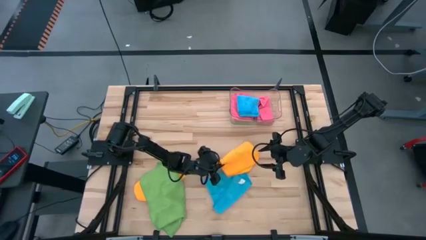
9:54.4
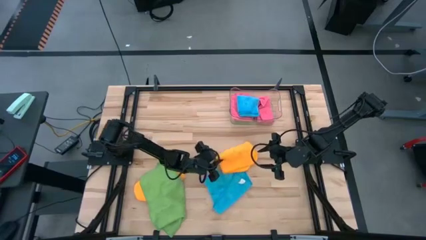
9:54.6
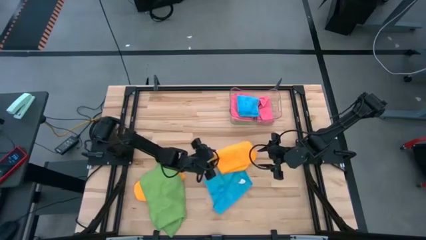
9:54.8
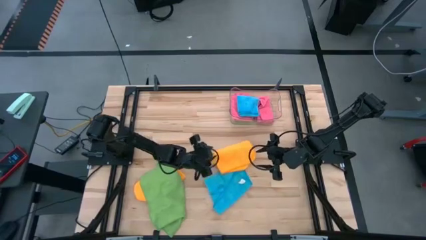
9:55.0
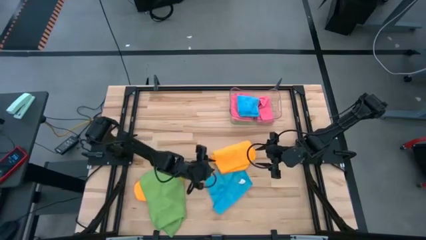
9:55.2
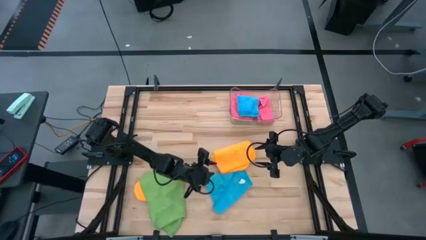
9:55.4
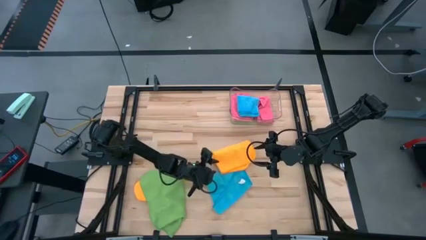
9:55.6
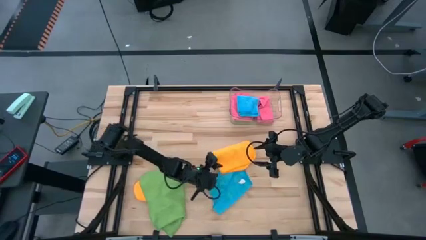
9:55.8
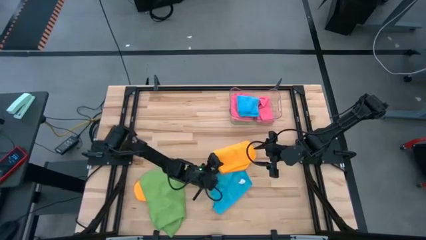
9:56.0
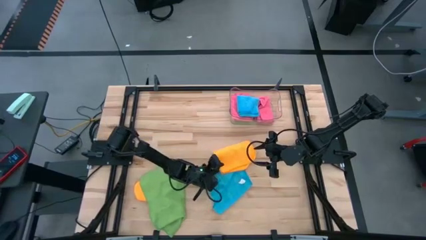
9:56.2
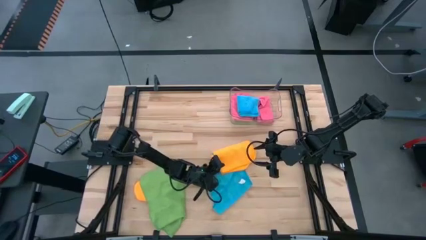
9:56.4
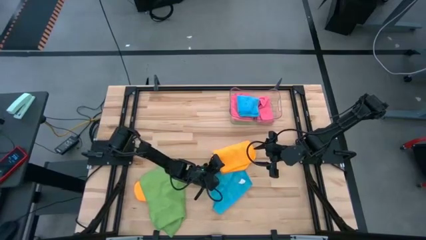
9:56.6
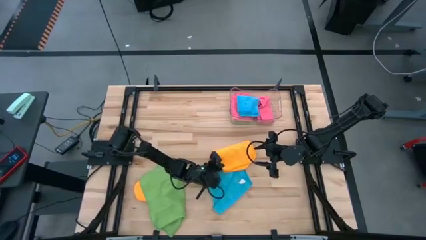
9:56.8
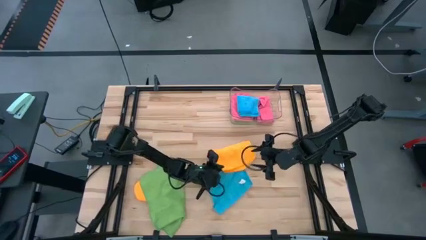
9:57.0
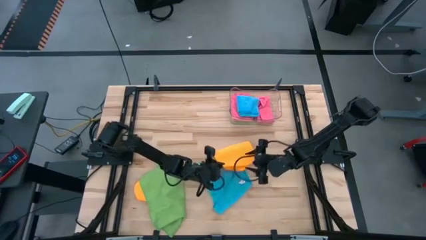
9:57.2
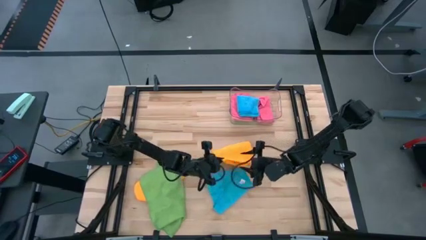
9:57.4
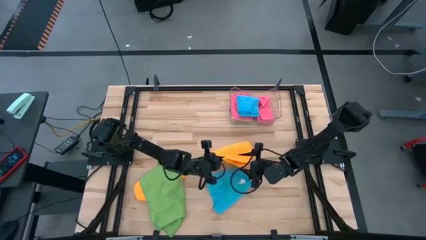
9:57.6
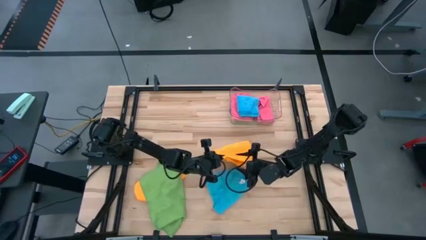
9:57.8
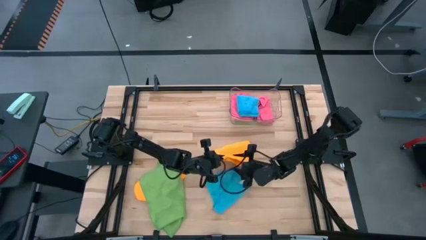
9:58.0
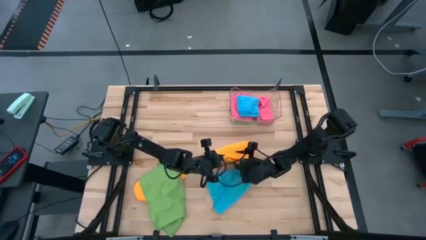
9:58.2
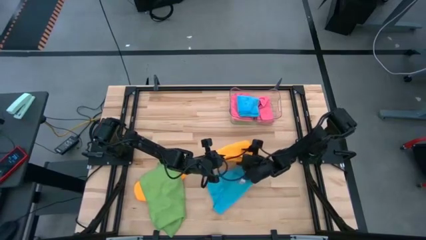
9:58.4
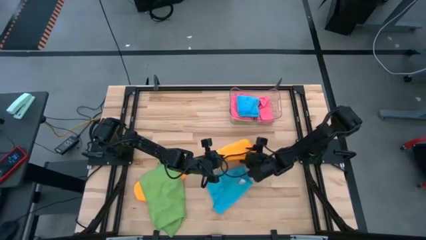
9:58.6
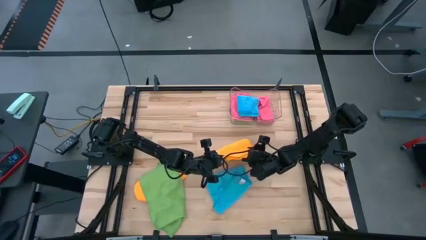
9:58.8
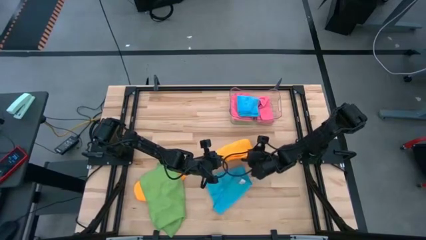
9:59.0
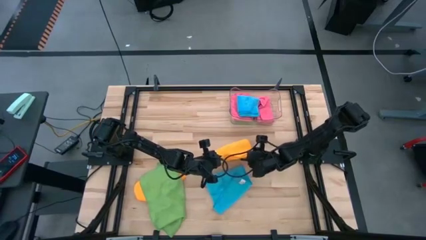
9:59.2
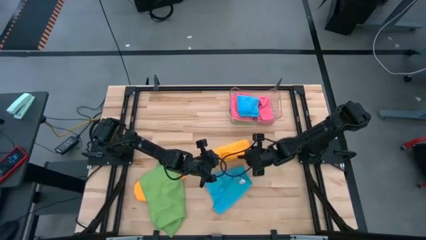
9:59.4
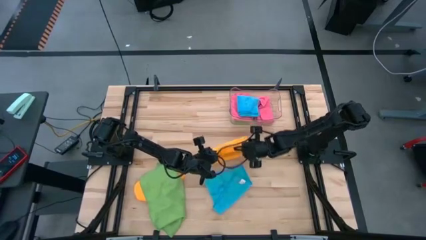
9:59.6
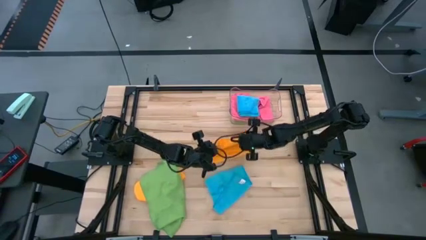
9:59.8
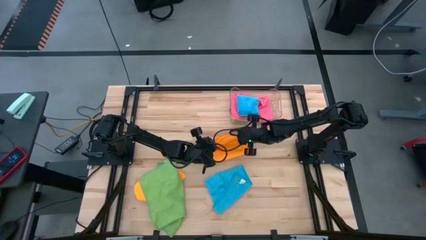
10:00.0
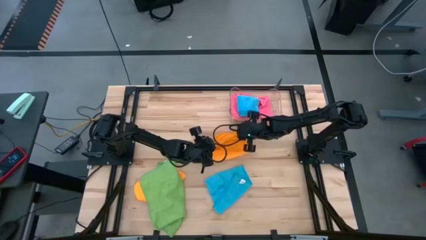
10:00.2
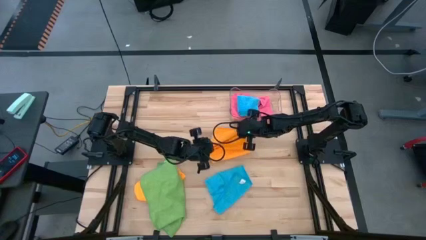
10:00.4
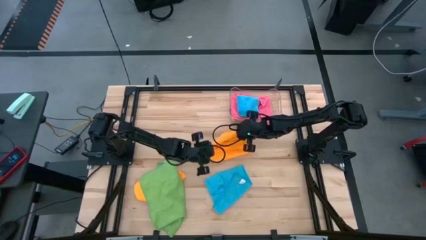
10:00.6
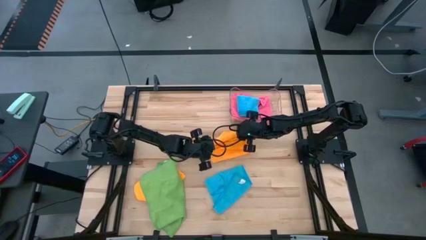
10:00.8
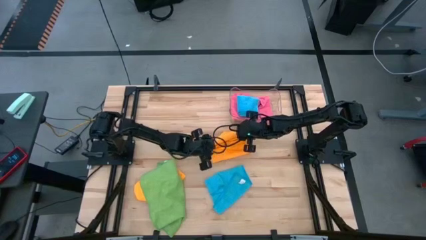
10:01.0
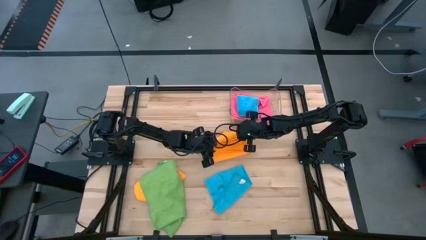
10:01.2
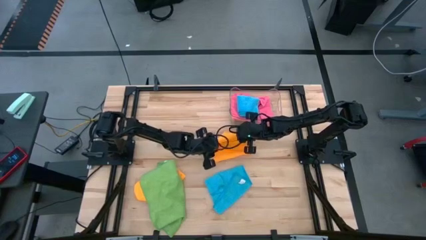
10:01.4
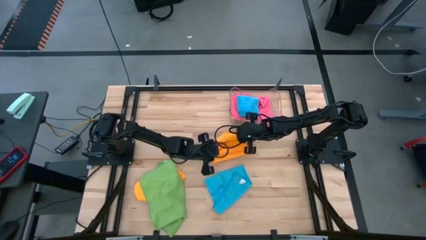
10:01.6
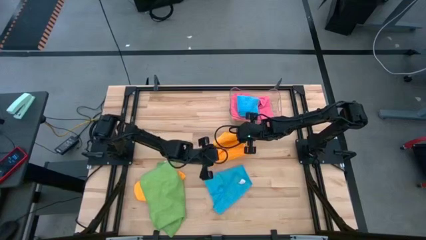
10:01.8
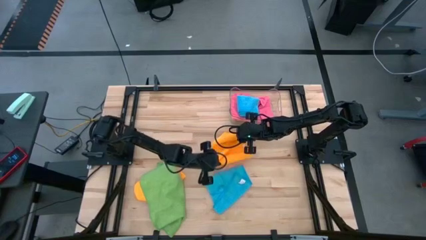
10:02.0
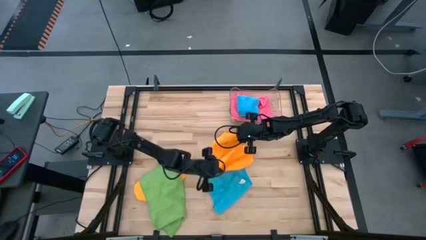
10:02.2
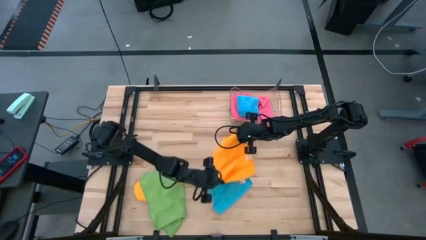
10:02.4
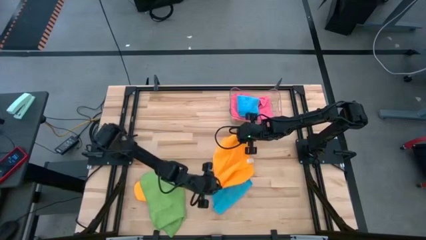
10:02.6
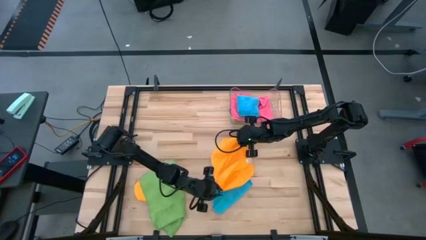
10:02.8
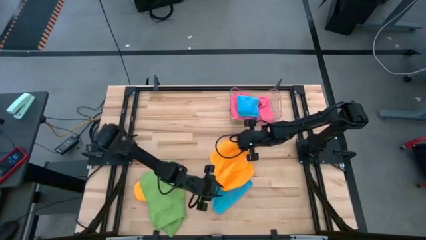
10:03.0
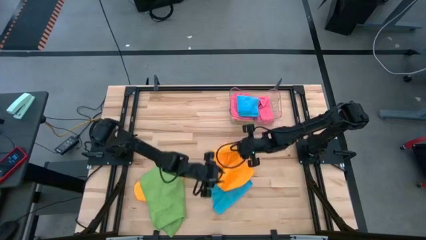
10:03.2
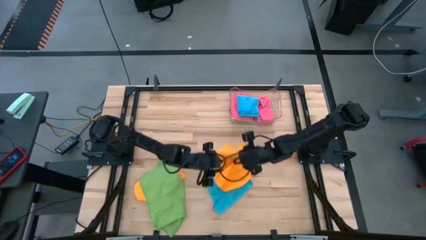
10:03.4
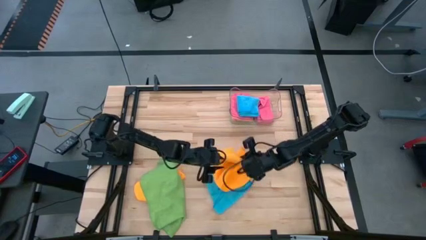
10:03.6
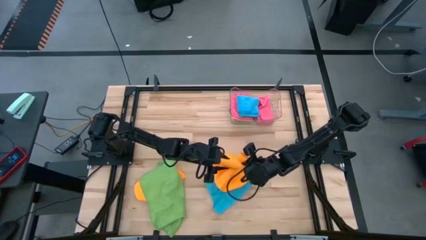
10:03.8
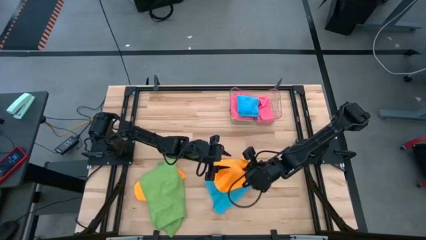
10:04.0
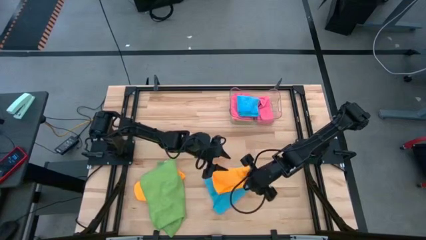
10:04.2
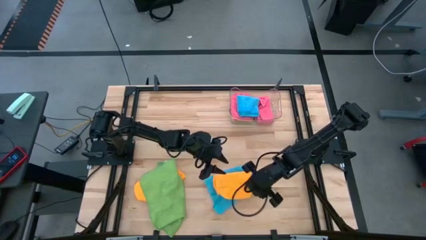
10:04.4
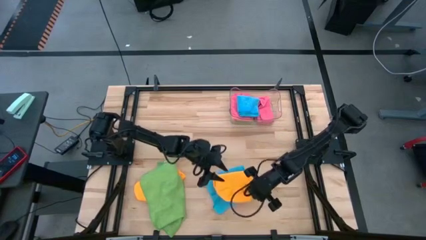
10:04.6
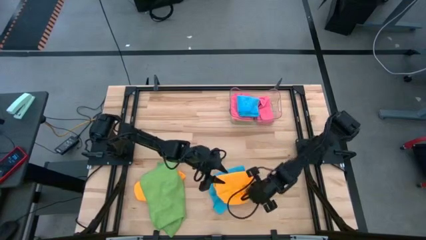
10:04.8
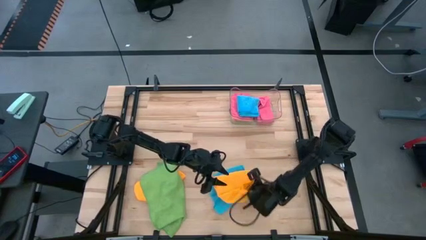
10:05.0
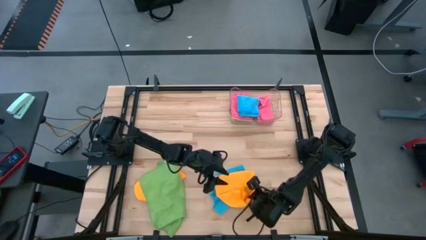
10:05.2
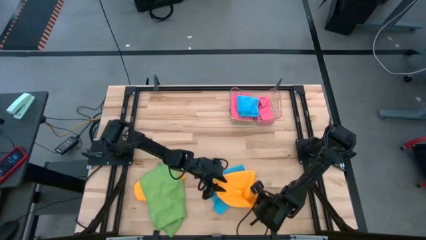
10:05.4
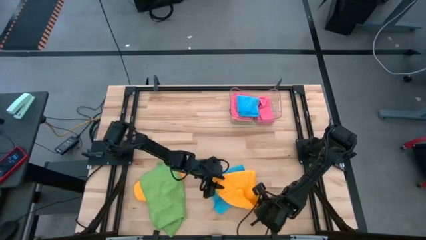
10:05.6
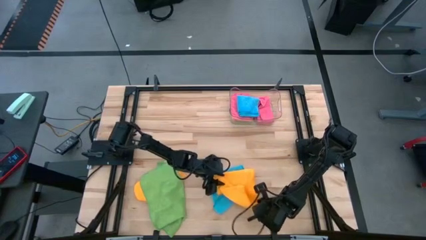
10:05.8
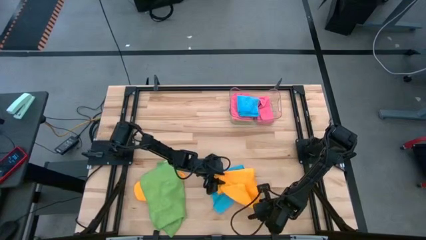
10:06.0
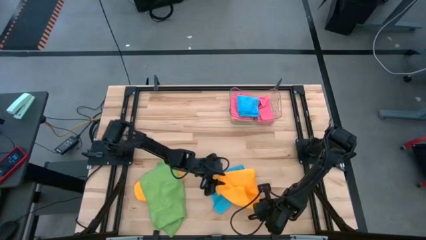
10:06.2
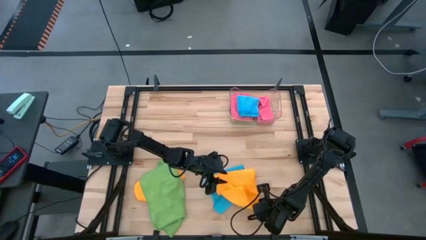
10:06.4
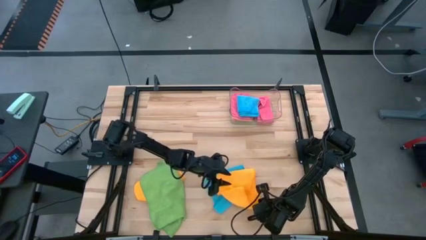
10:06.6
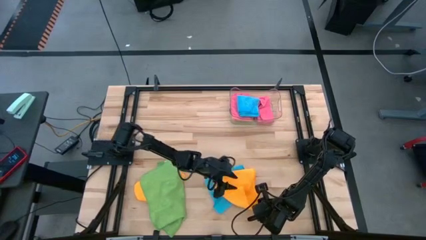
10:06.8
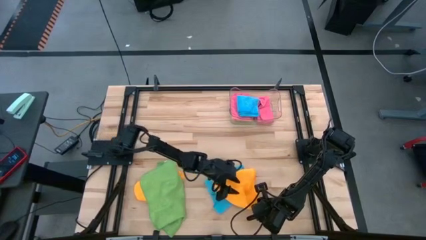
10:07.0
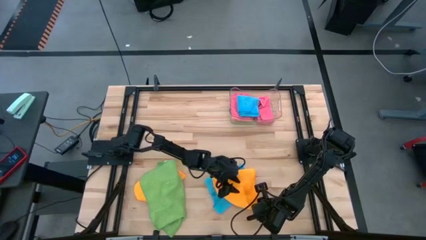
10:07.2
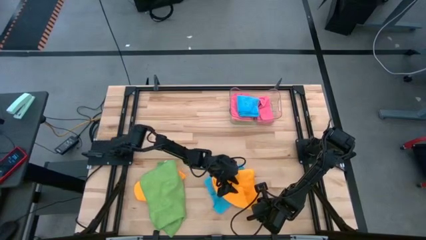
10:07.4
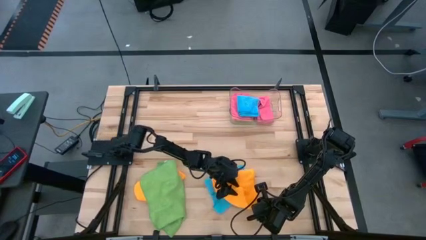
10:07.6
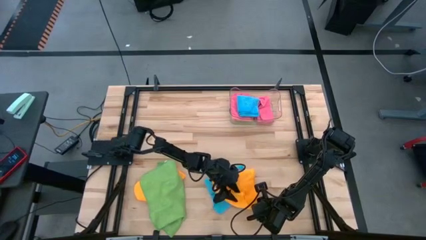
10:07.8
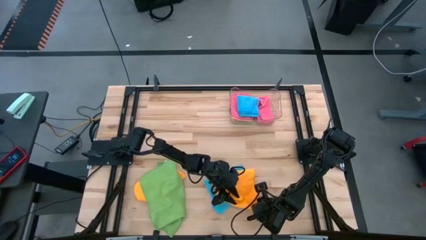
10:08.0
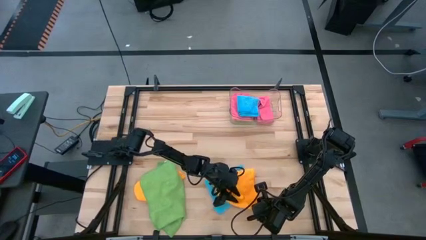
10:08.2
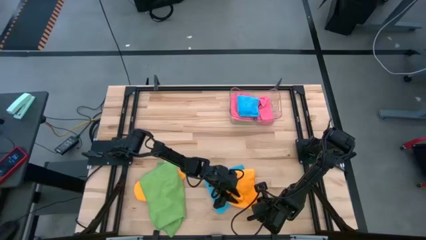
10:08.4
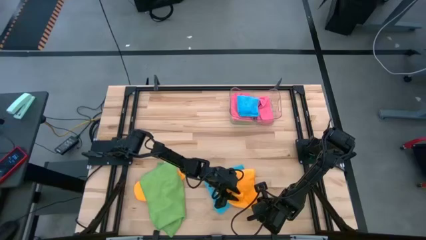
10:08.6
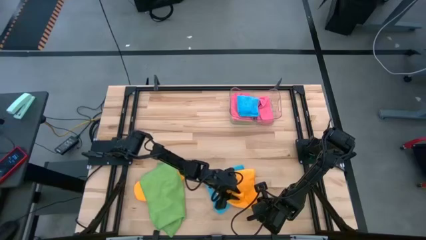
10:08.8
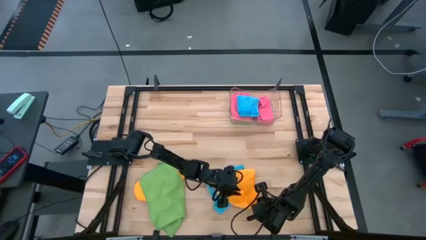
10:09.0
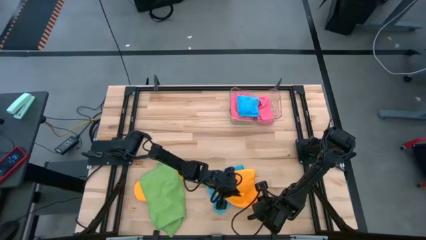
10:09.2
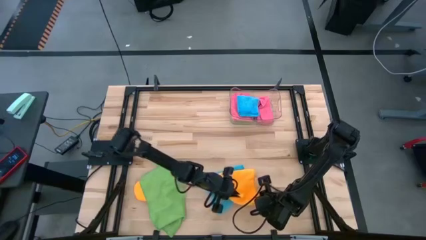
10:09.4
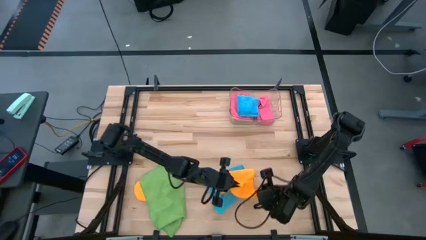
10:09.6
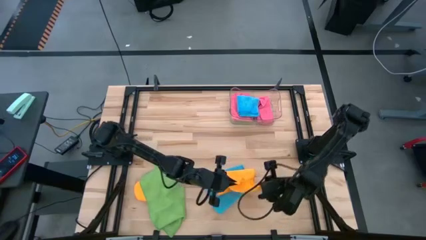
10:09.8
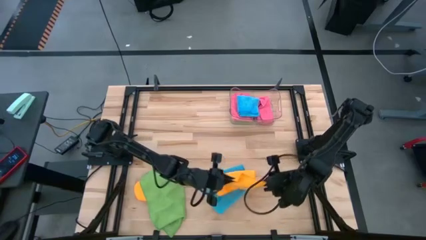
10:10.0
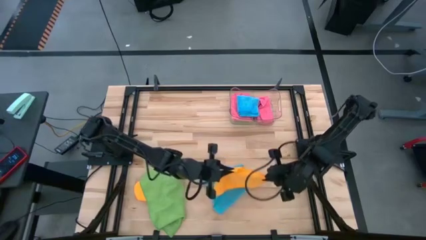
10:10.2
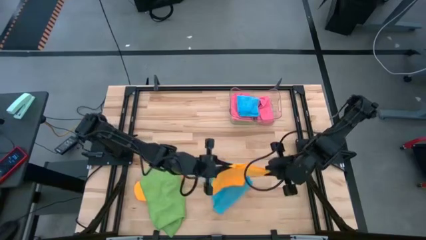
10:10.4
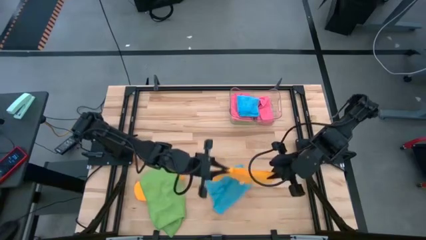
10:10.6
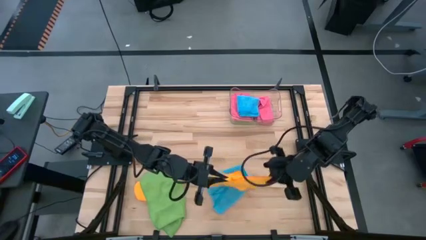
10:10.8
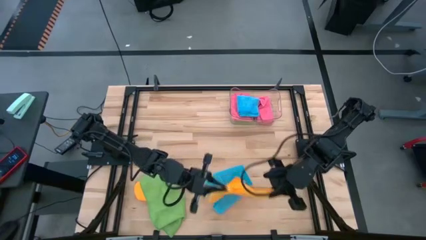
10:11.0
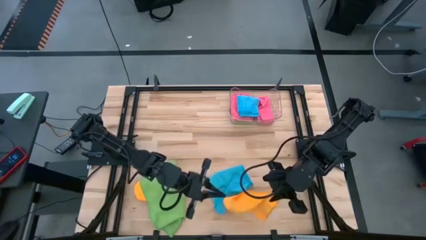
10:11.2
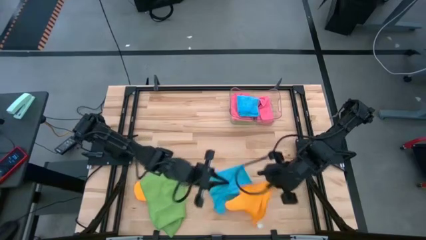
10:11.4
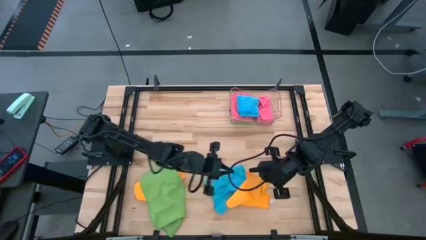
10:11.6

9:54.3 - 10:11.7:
Task: Fold microfiber towels
Fold the right yellow towel
